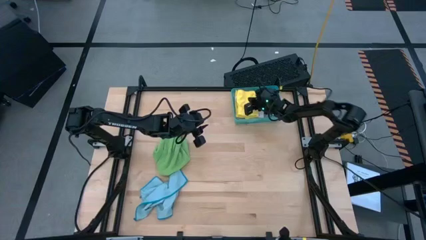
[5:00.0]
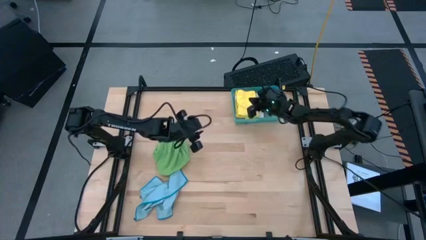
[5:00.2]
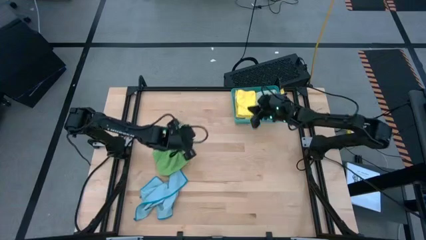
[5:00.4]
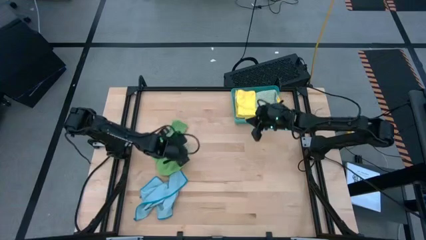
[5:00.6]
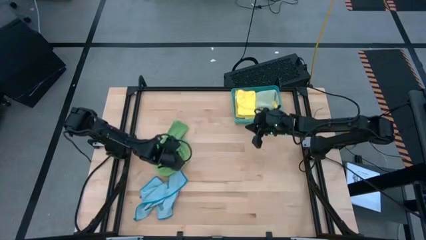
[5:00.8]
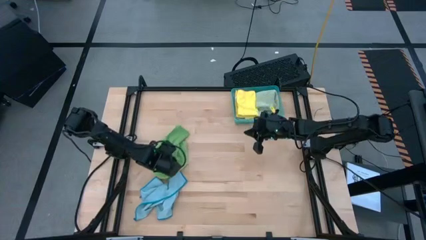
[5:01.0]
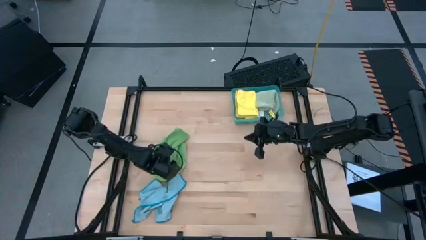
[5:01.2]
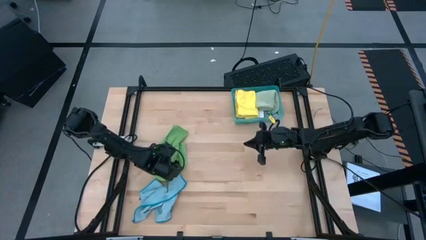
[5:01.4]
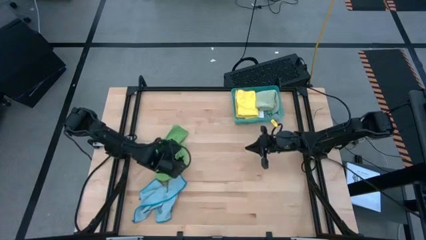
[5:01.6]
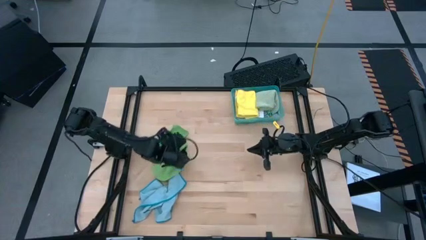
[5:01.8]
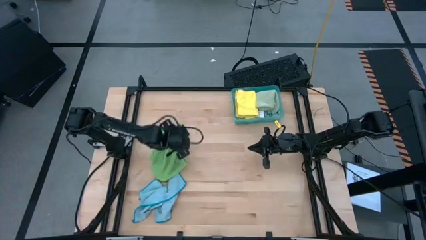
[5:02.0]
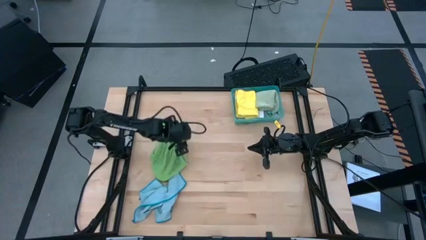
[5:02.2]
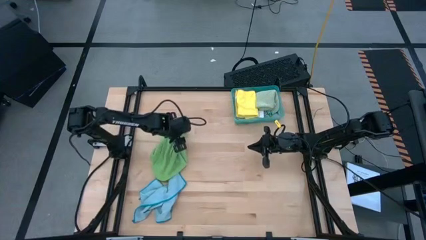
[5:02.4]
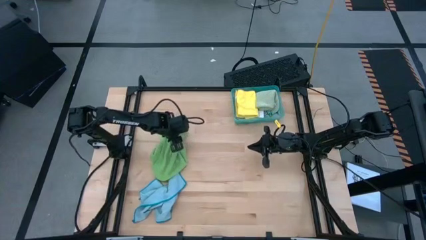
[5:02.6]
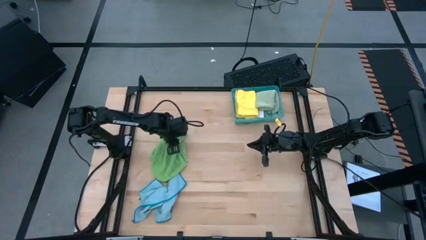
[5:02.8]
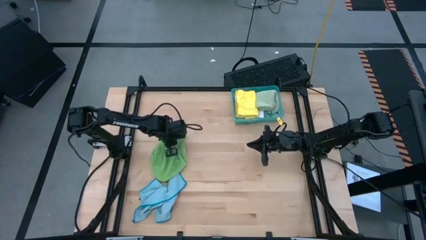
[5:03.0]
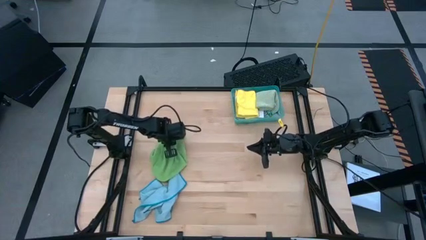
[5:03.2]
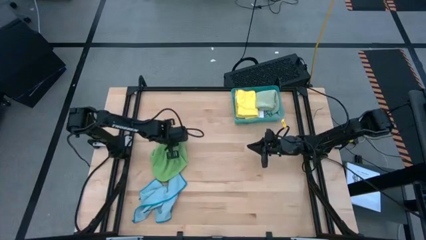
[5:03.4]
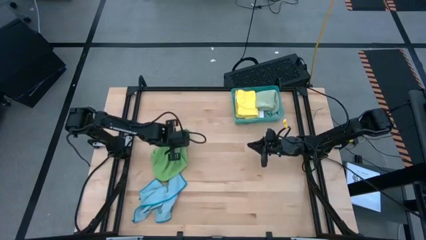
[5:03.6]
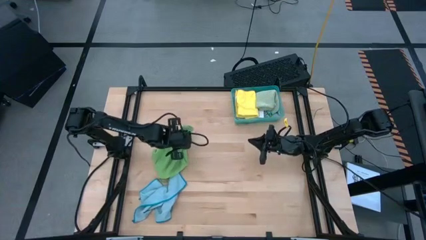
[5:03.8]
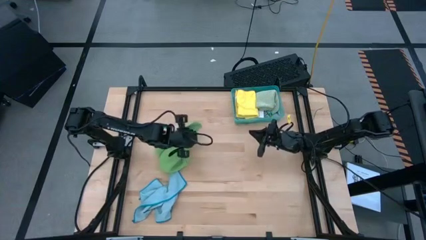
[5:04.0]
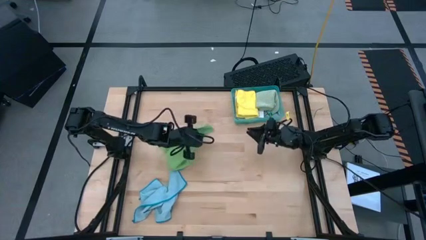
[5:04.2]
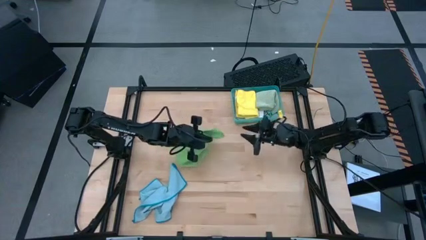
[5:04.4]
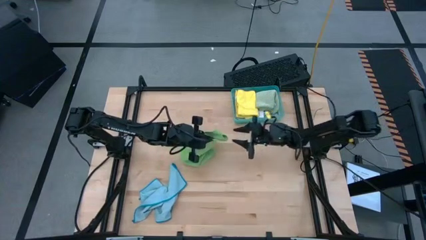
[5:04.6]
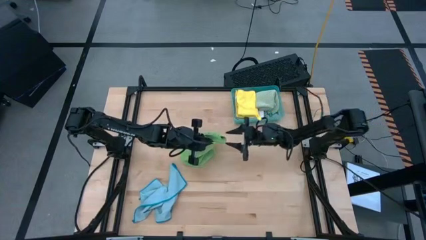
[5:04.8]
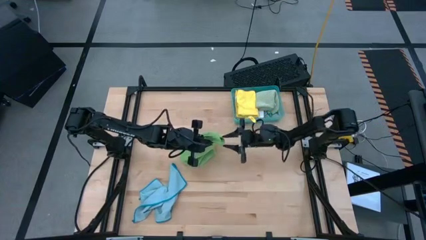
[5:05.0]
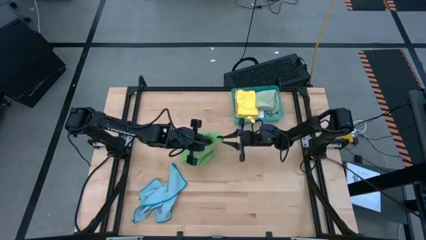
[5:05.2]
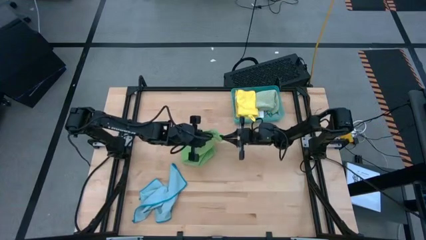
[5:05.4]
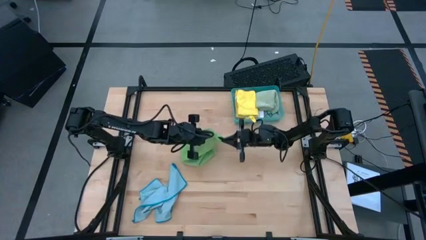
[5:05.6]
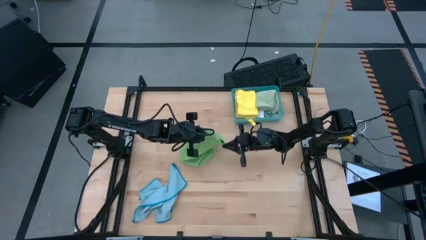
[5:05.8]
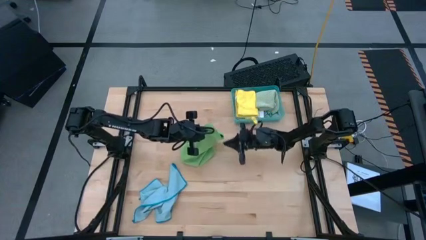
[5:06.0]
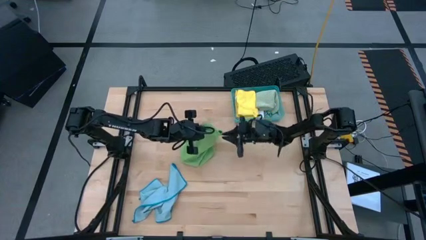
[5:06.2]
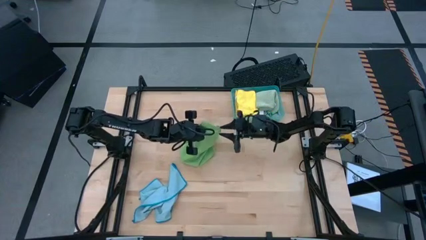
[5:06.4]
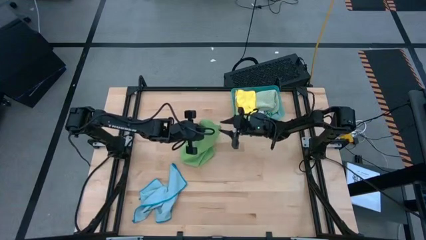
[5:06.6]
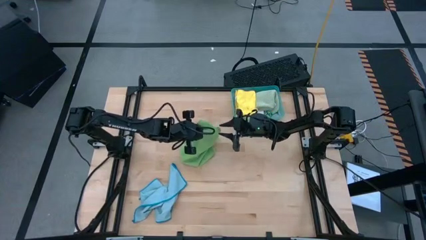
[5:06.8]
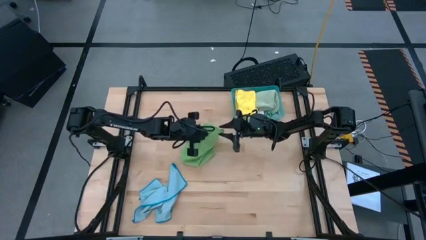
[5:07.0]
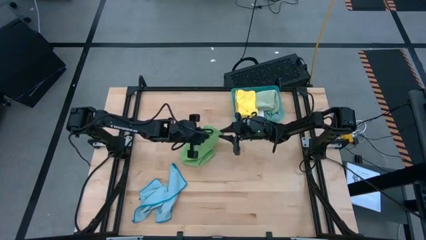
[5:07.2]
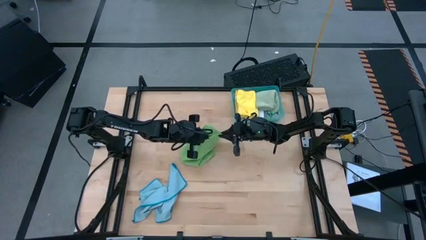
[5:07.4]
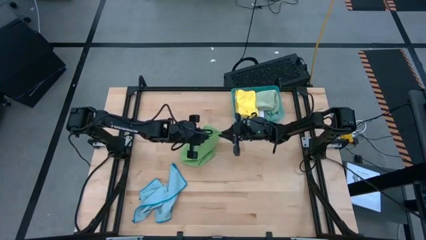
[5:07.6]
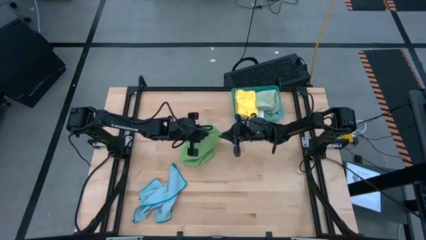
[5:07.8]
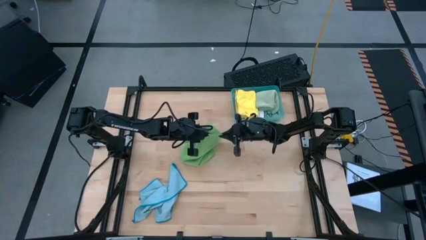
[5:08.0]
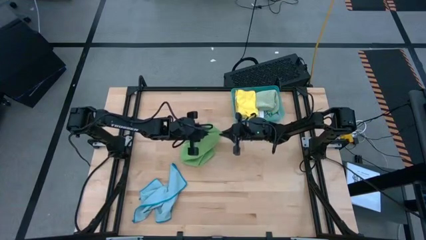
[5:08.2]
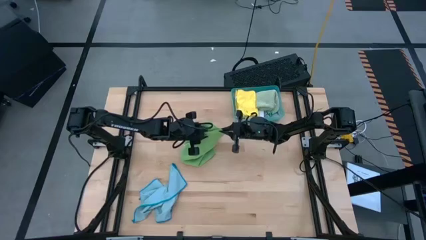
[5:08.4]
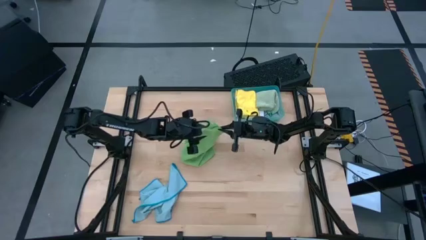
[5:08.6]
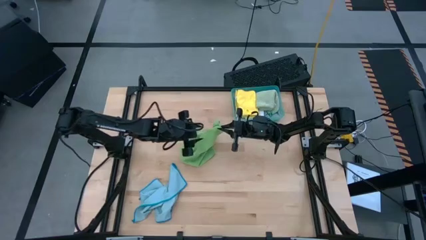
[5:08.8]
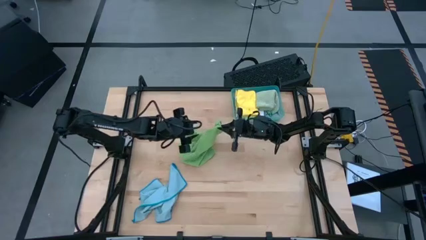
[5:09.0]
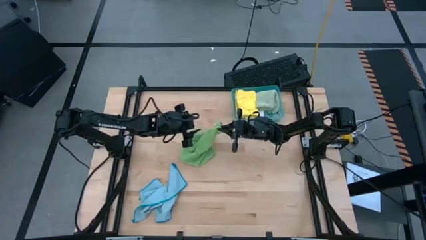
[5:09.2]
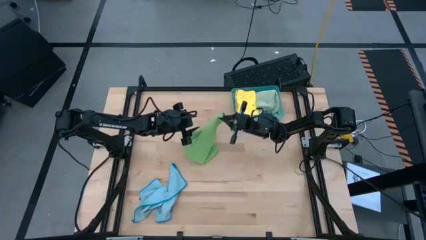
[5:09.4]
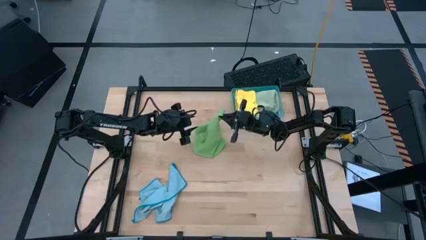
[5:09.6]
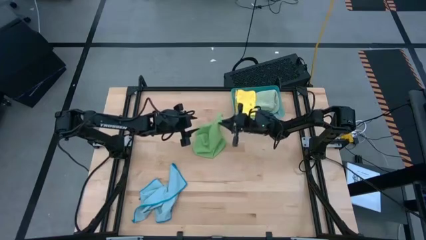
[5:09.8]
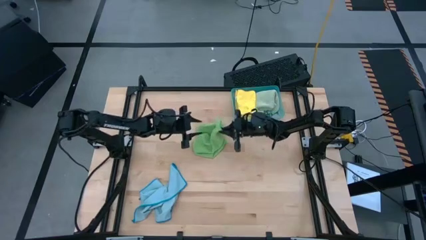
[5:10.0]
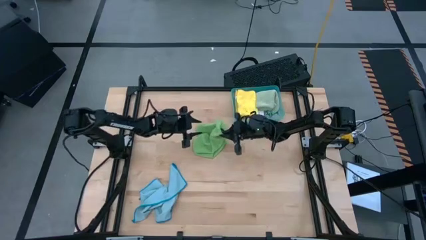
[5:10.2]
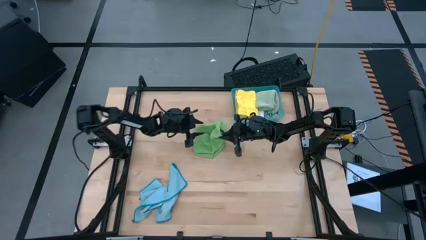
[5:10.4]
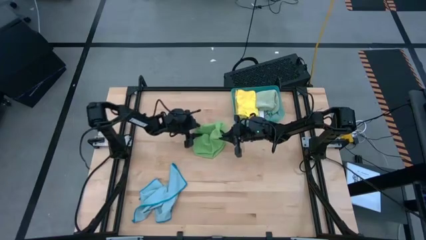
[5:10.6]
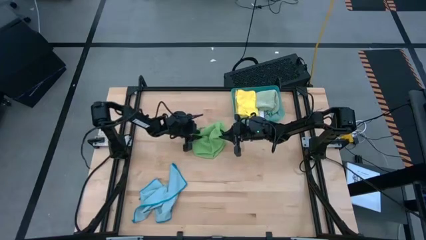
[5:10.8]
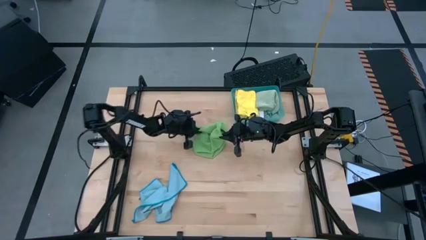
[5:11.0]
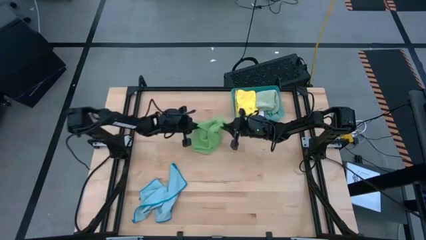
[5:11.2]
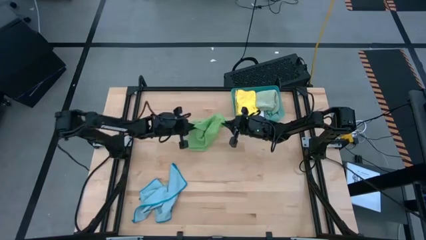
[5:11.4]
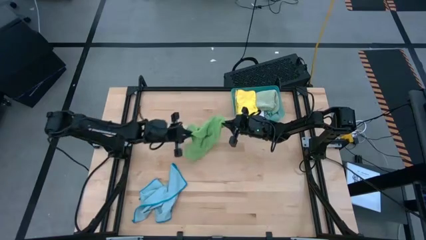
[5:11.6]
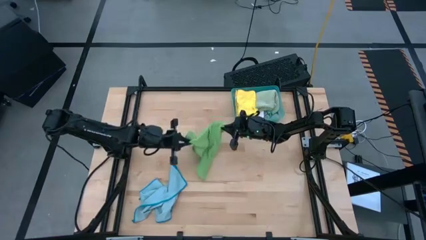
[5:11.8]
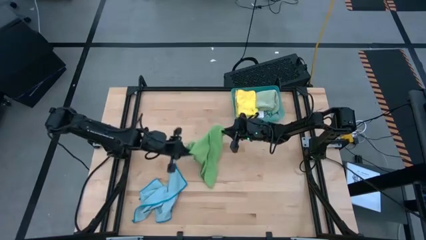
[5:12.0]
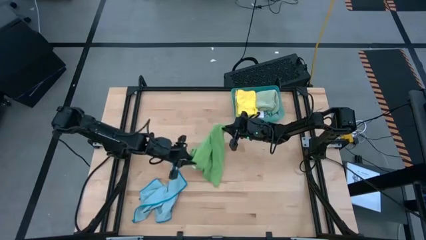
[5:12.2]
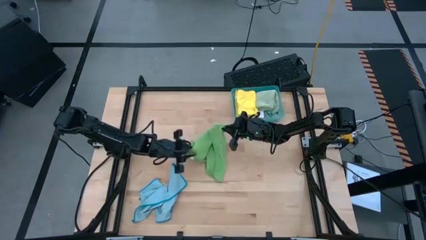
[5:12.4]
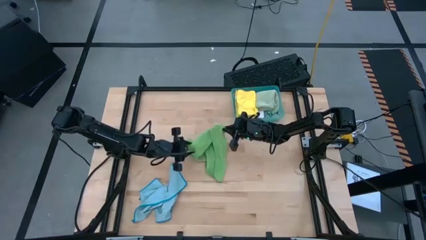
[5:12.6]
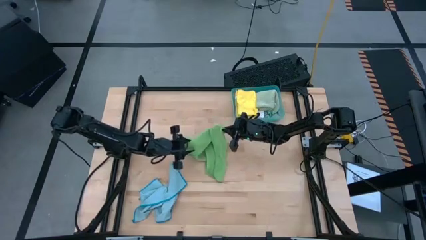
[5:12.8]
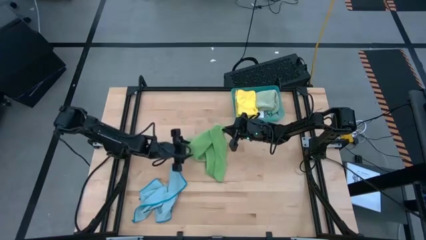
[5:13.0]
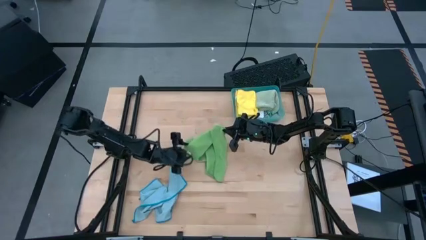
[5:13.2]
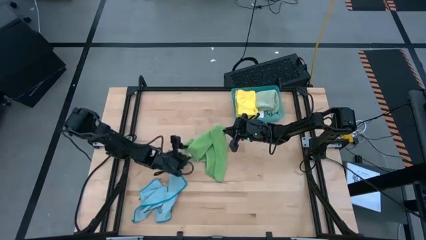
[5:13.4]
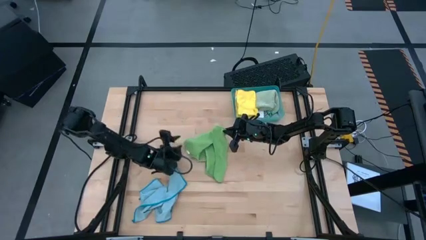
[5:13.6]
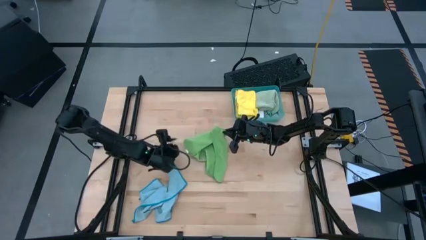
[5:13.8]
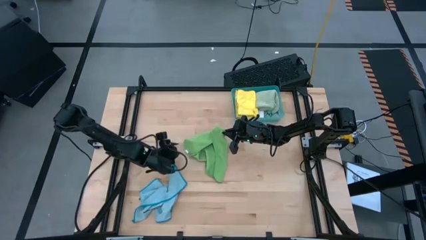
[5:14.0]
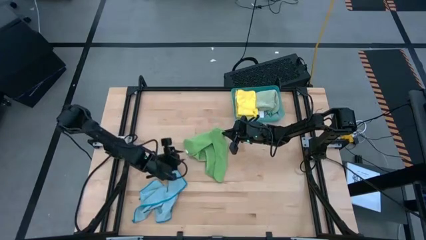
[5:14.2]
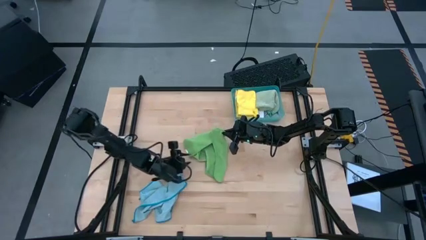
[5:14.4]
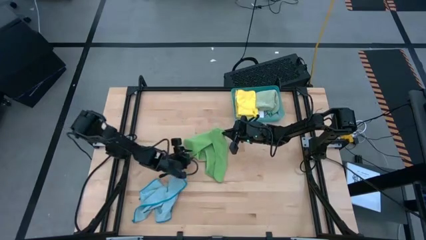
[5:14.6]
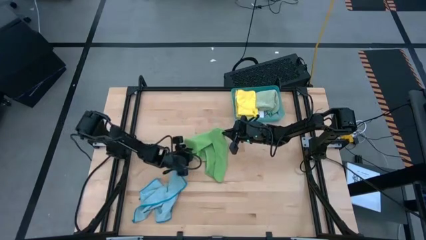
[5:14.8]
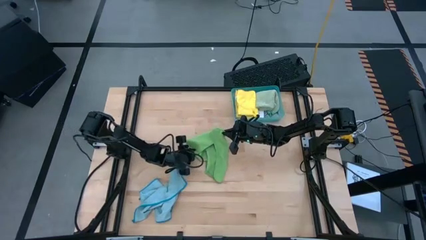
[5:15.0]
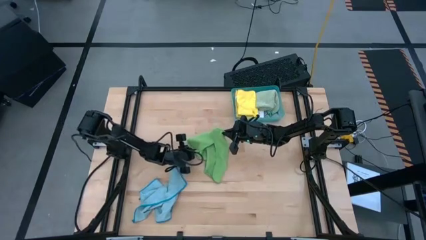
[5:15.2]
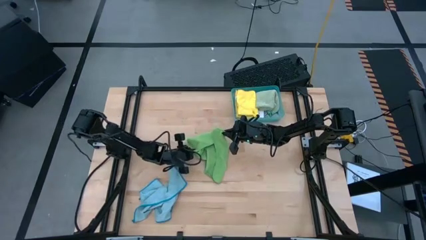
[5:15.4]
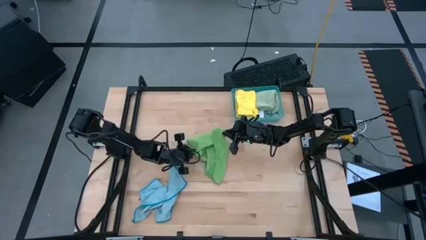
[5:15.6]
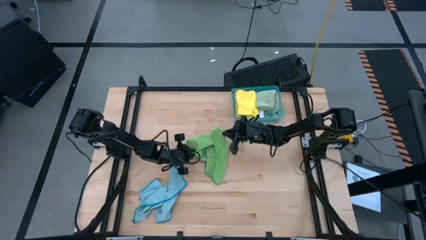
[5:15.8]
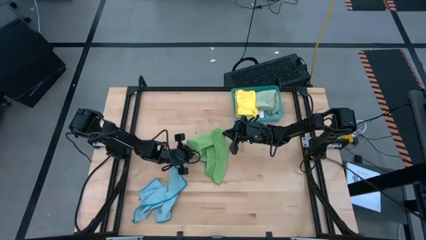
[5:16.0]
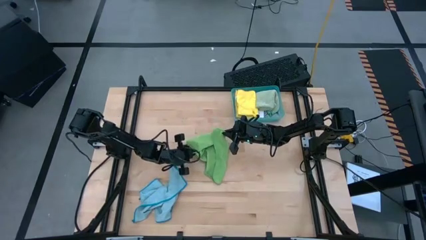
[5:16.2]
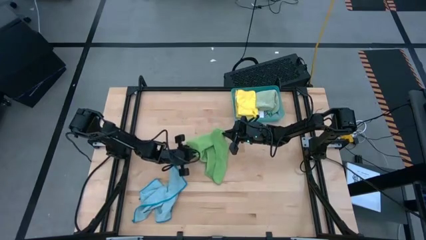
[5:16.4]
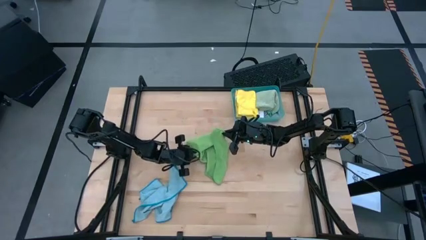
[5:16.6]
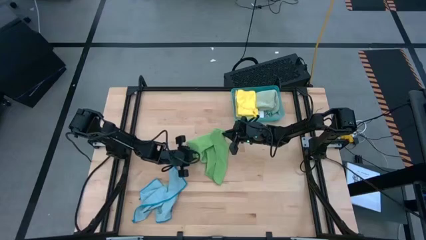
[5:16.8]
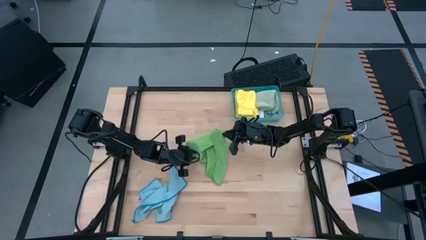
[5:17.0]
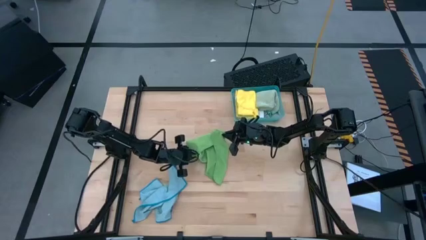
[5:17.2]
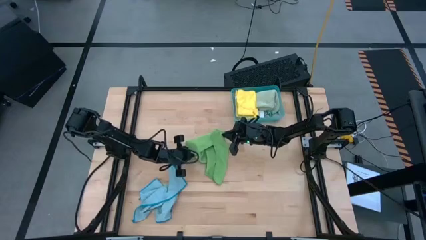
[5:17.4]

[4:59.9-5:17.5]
Task: Fold microfiber towels
Fold the green microfiber cloth
